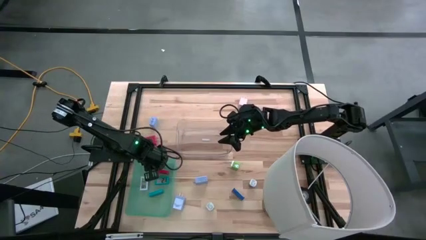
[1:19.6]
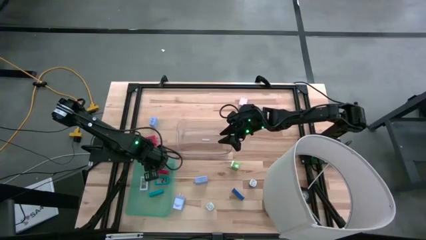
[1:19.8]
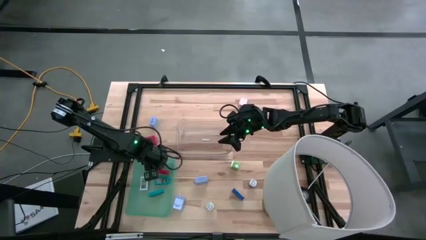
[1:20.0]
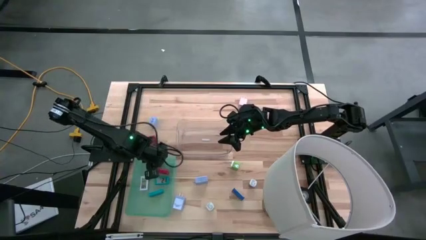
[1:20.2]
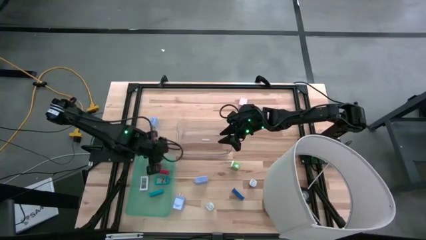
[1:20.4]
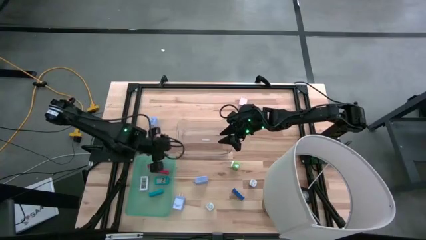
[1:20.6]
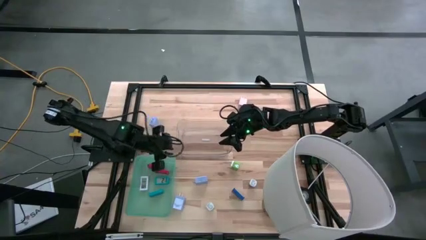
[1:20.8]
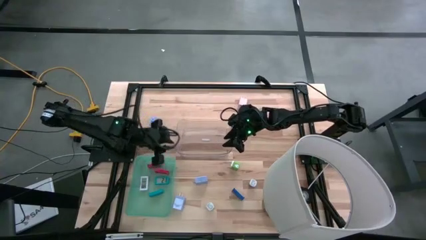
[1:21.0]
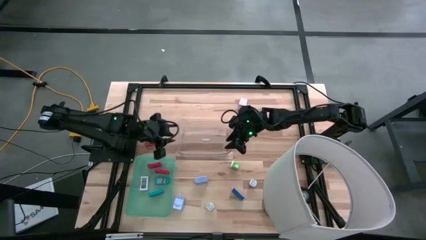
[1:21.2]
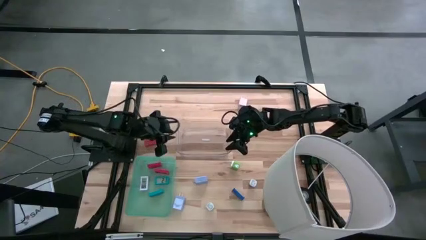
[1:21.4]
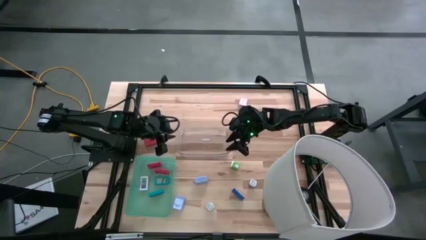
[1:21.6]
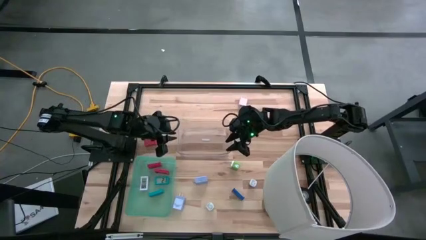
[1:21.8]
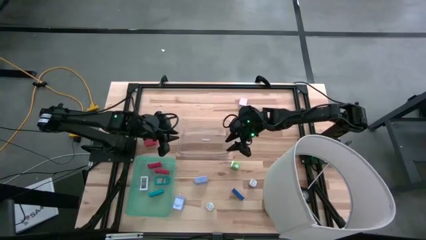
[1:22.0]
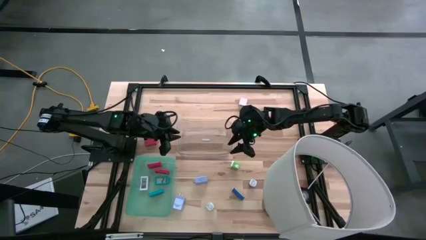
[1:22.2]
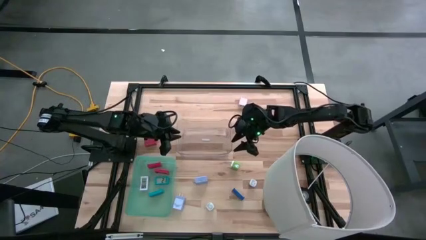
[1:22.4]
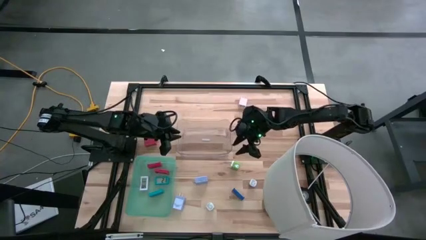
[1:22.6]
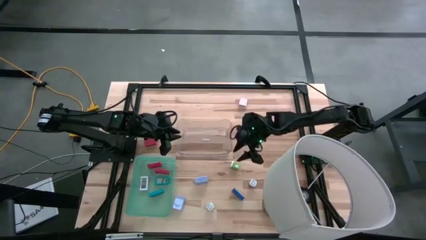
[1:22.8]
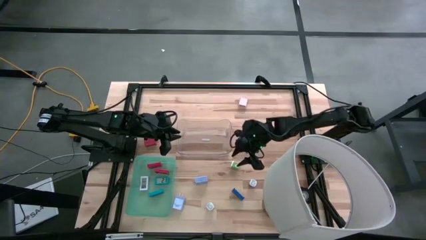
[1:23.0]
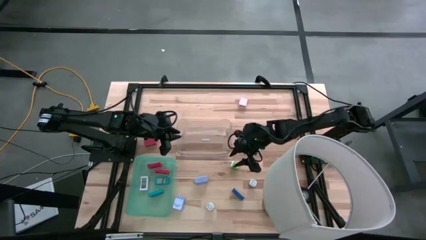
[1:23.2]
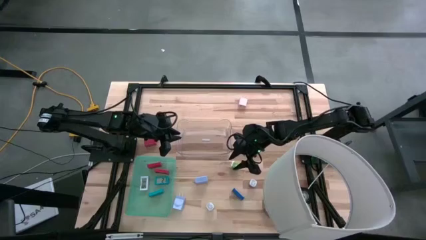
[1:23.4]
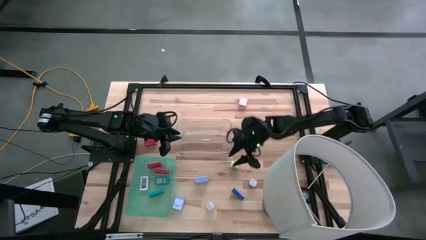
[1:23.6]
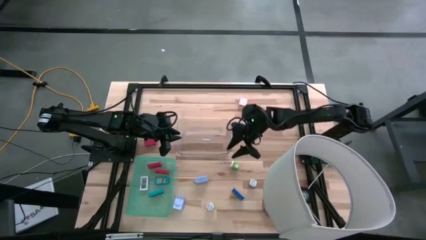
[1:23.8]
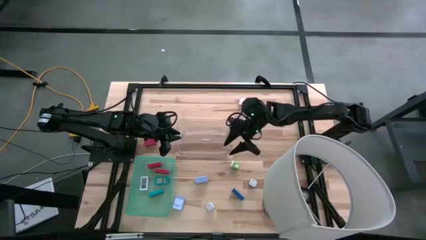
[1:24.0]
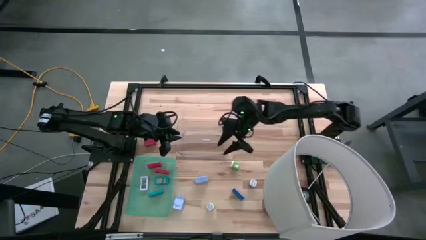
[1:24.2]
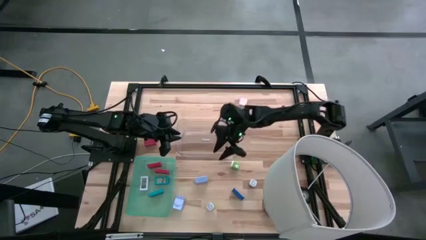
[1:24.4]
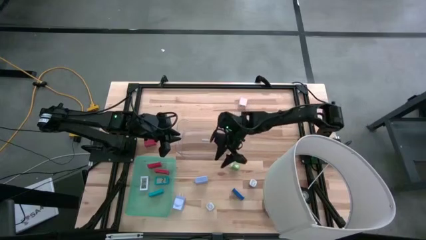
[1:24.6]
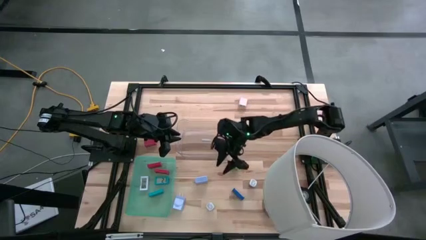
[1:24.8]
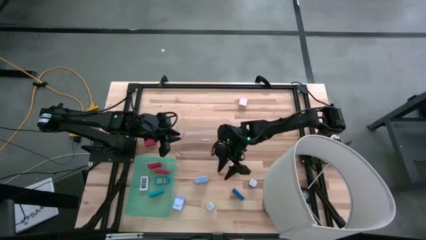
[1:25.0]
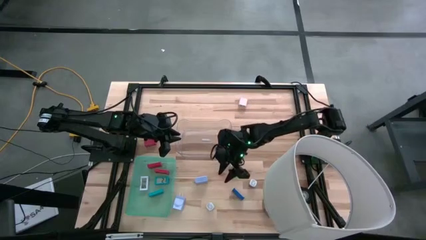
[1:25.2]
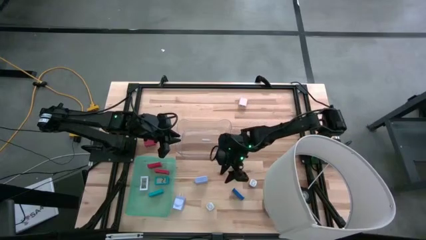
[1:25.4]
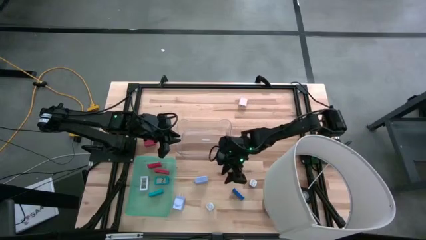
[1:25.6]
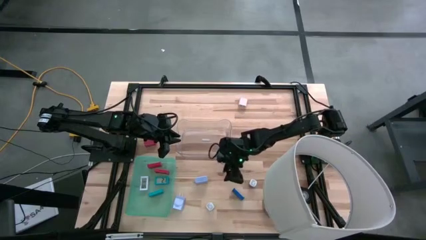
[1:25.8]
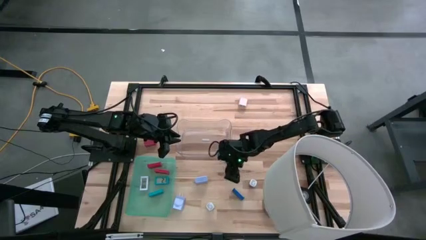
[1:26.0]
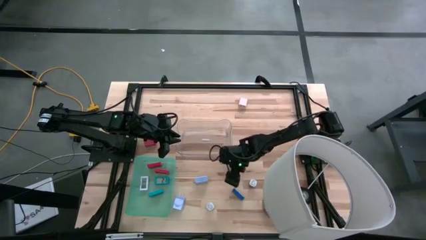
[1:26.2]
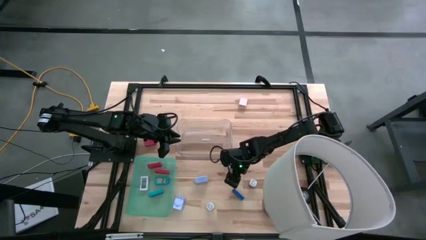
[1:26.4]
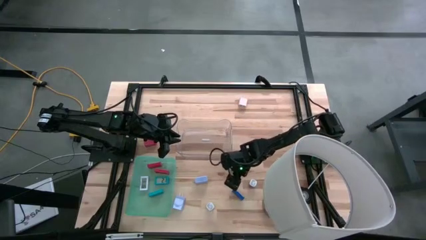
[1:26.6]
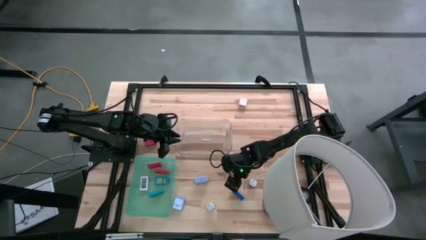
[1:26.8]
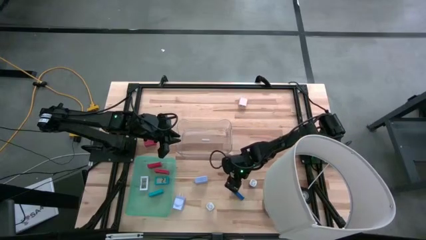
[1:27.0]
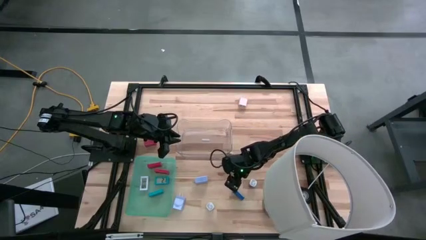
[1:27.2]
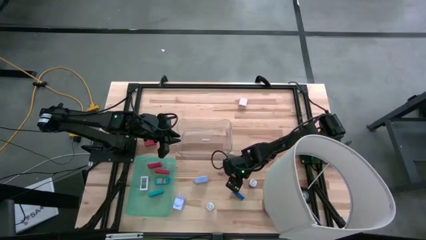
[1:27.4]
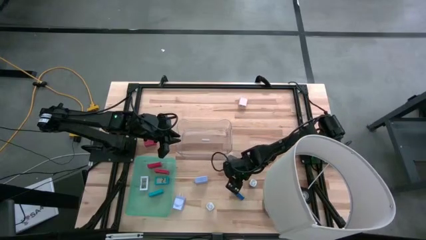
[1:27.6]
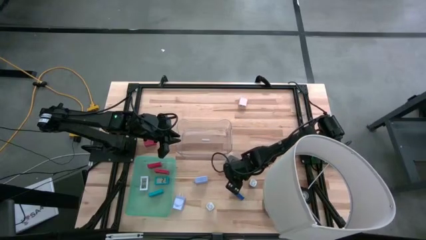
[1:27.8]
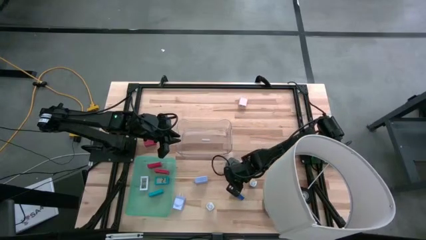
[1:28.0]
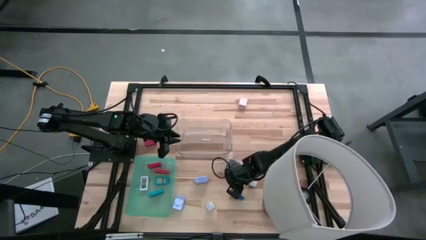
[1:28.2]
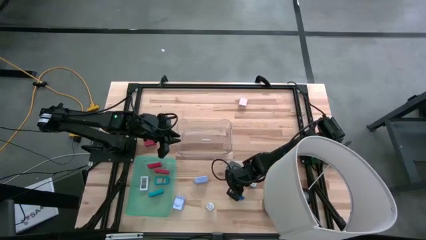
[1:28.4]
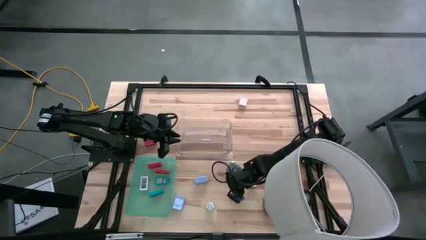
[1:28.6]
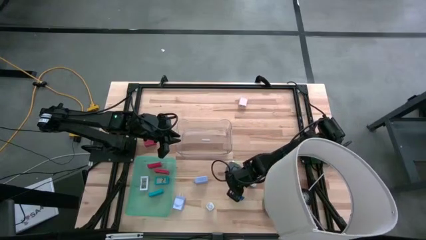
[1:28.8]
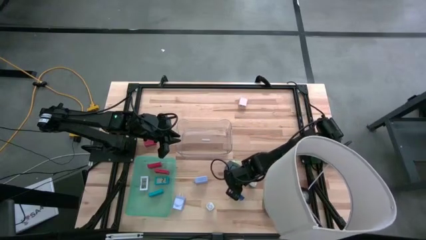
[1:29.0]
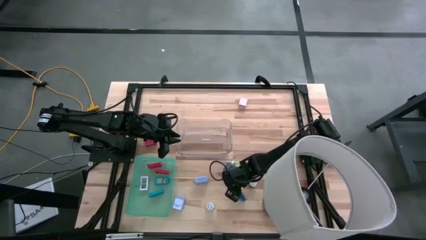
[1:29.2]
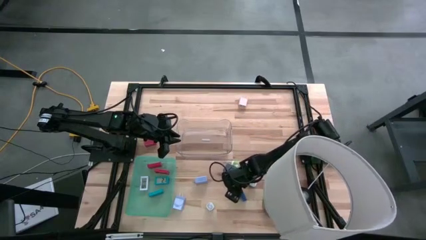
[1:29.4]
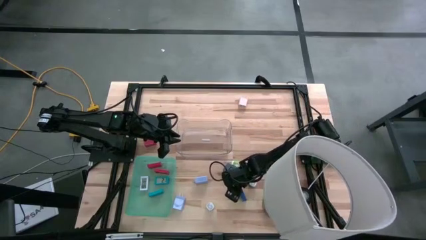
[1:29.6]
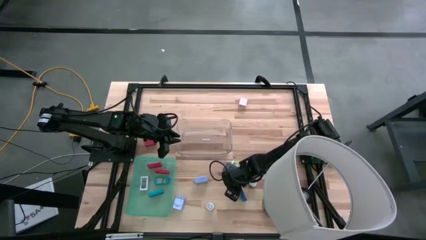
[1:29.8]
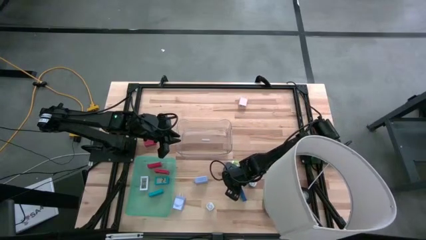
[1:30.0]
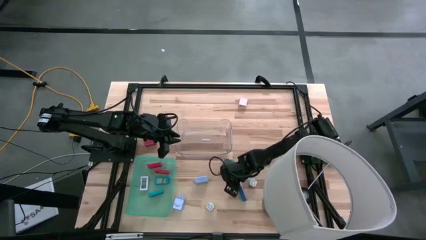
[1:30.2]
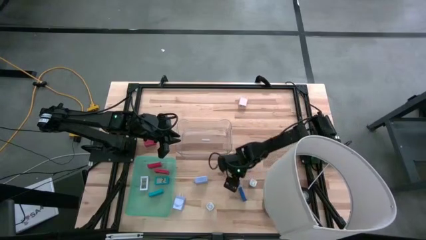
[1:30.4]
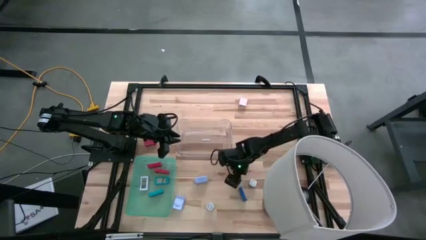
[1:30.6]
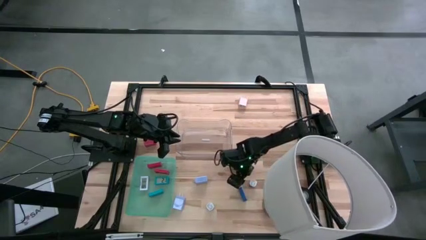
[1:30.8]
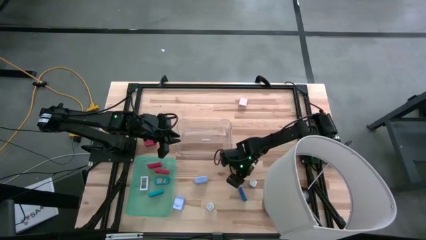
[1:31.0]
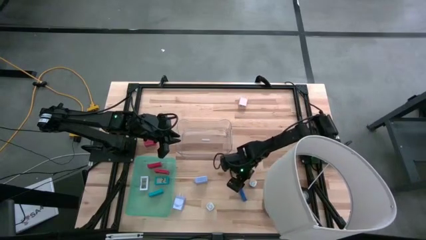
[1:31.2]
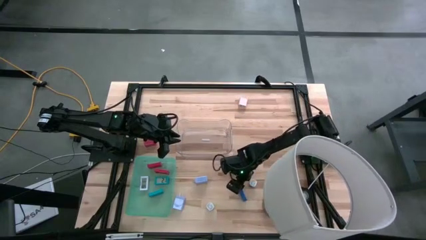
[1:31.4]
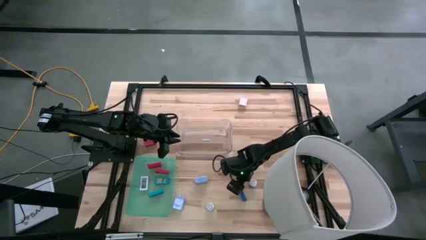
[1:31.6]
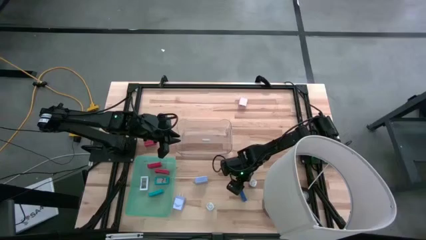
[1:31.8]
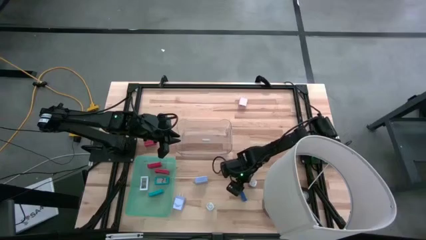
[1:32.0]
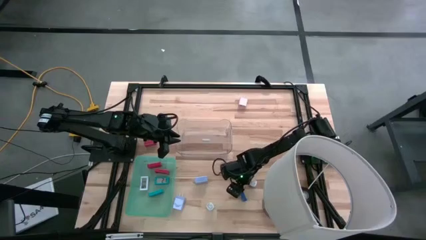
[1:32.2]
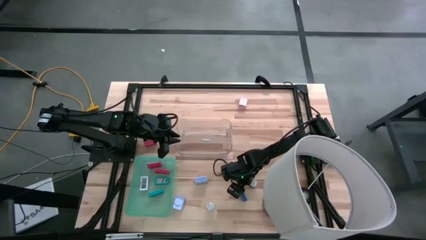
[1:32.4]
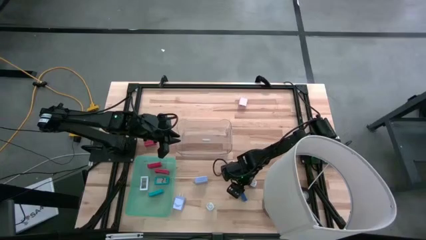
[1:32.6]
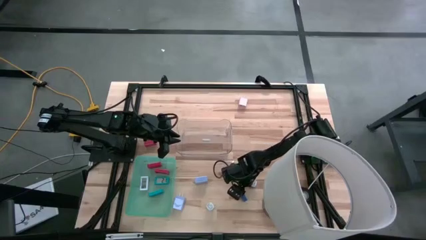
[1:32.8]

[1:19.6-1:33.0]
Task: Pick & Place Office items
Put the dark blue digital clock into the green bin

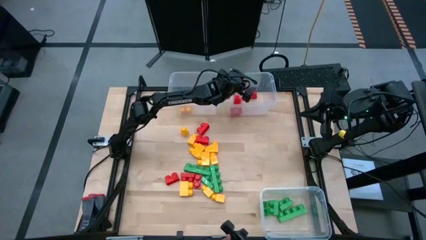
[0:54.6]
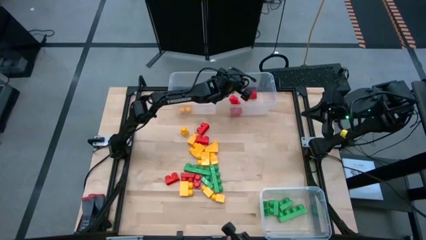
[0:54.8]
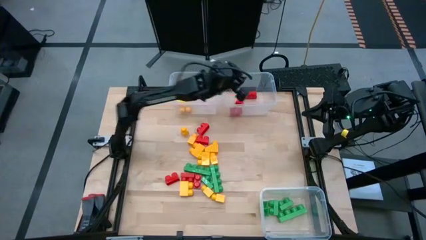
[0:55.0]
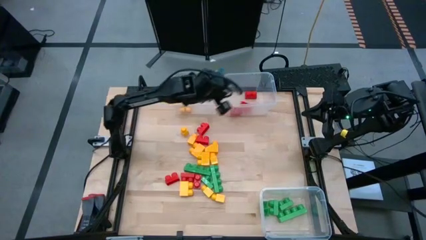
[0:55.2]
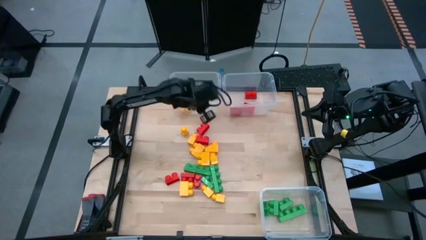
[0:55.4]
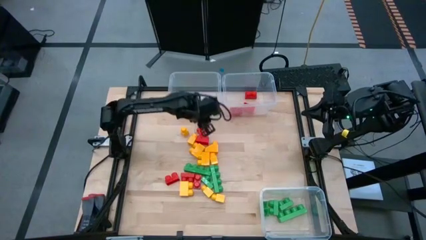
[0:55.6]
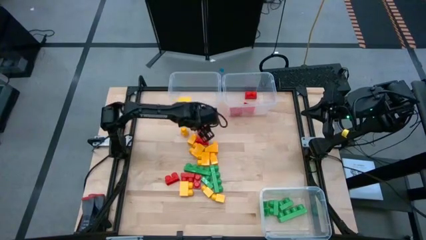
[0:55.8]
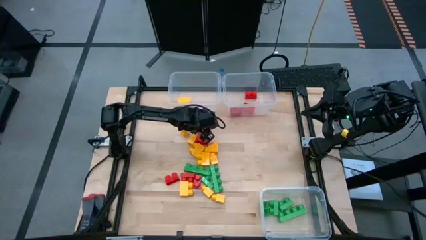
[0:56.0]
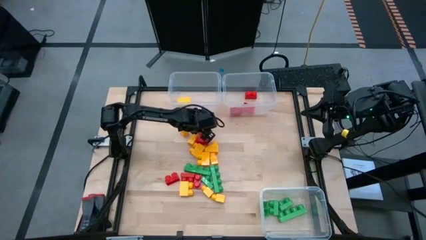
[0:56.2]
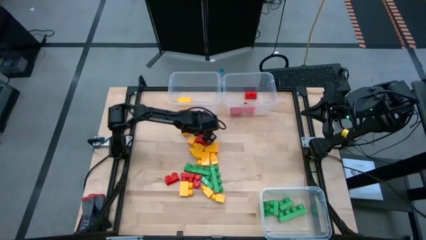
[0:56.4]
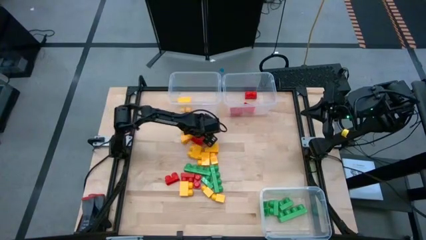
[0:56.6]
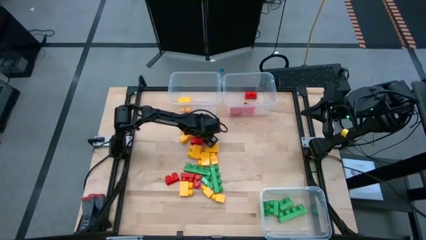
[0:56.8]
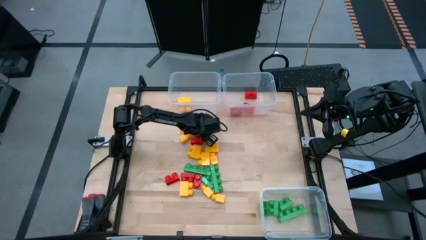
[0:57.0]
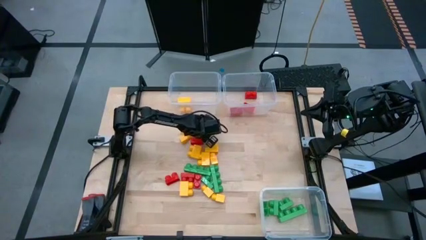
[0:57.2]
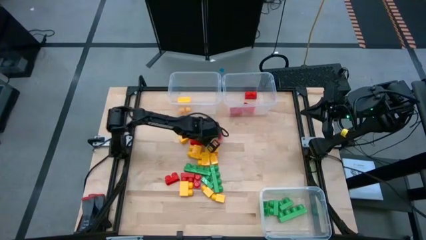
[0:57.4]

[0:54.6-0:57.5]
Task: Sort blocks
Put the red piece into the top right transparent bin

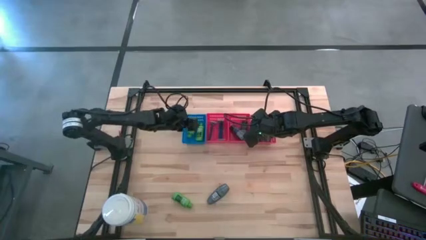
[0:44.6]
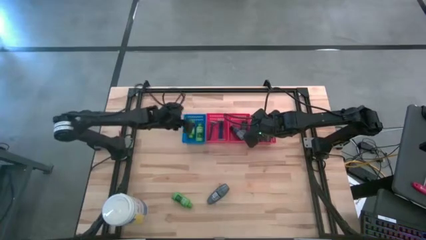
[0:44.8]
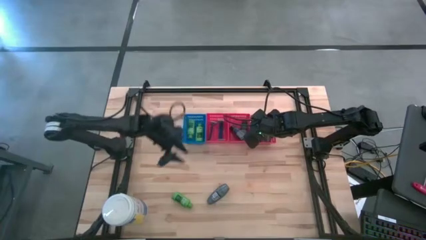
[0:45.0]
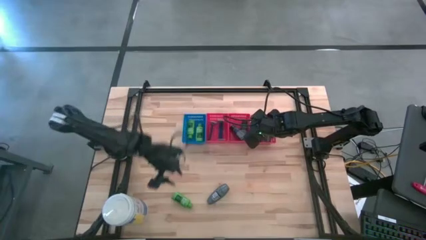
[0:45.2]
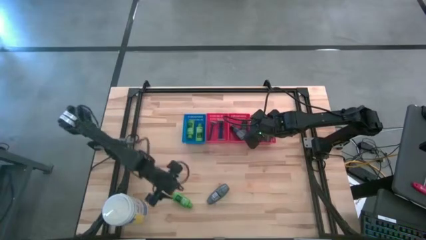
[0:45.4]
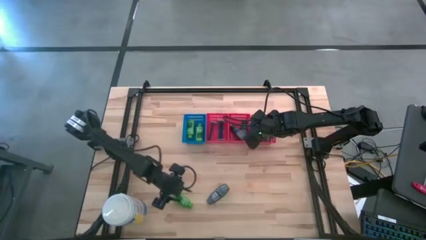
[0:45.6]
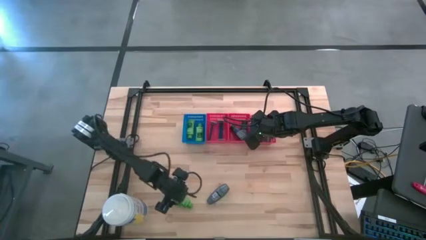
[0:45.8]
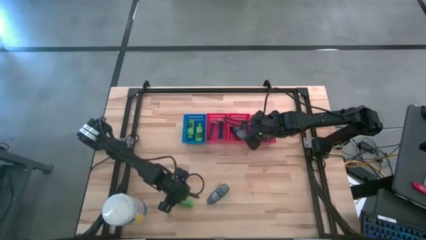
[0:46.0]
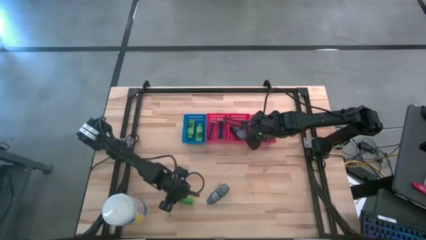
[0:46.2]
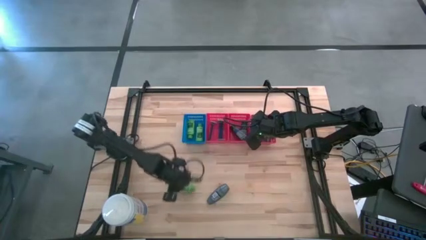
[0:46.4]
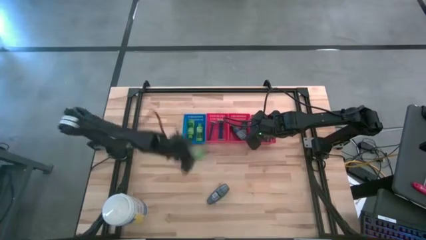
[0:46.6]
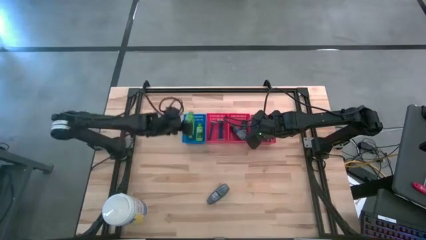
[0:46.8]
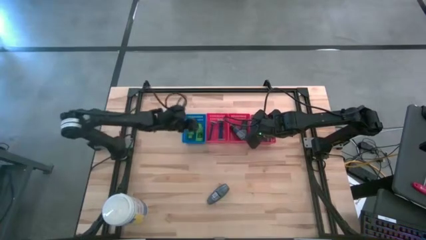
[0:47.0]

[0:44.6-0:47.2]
Task: Pick & Place Travel size toiletries
Put the green shampoo into the blue bin
